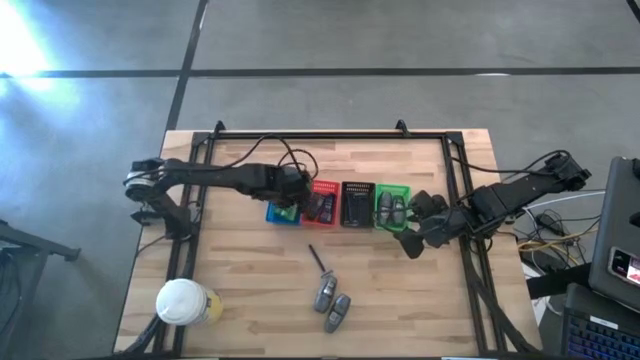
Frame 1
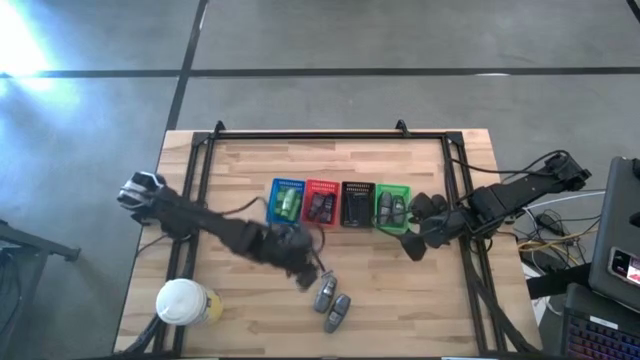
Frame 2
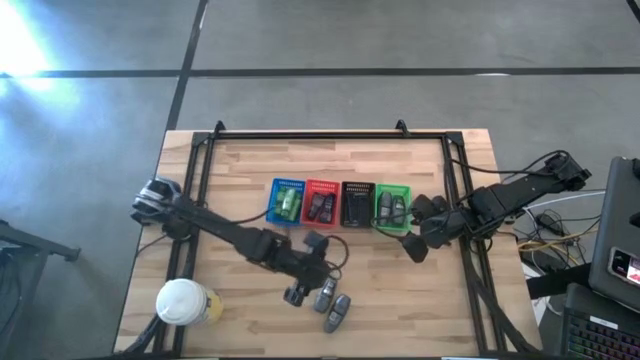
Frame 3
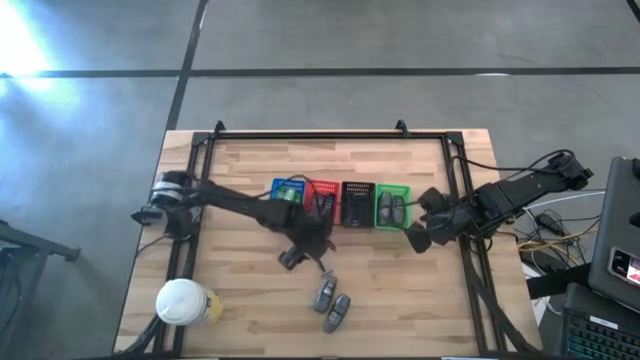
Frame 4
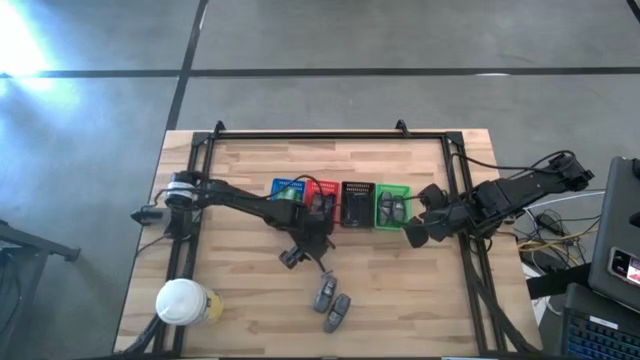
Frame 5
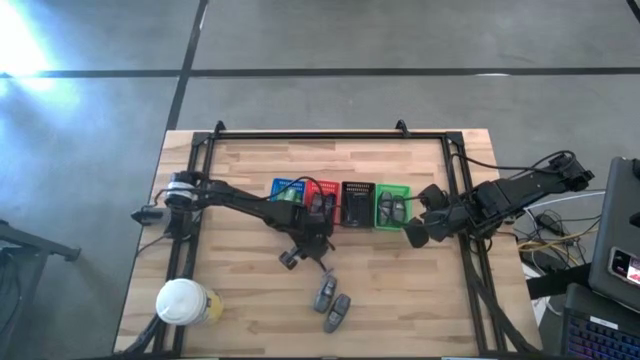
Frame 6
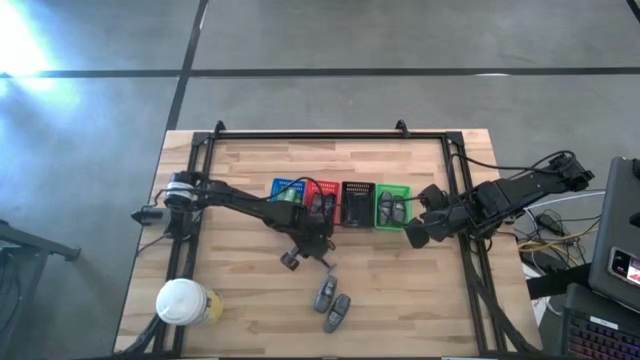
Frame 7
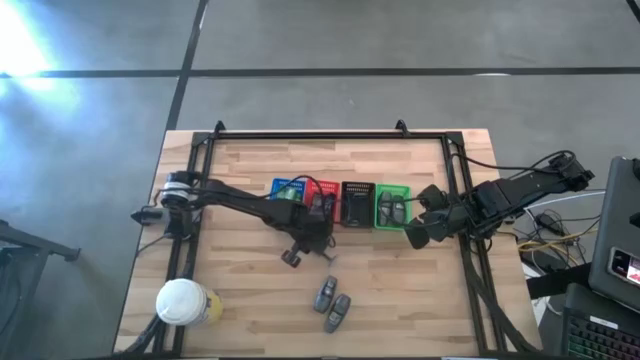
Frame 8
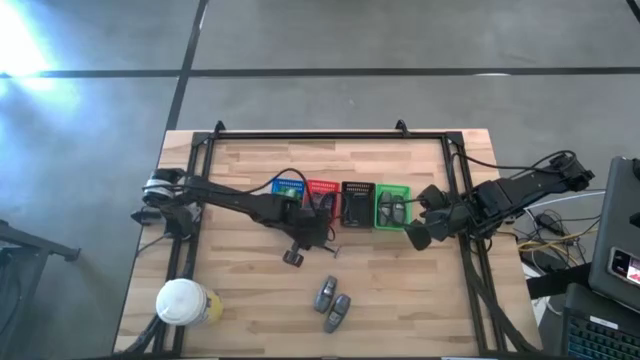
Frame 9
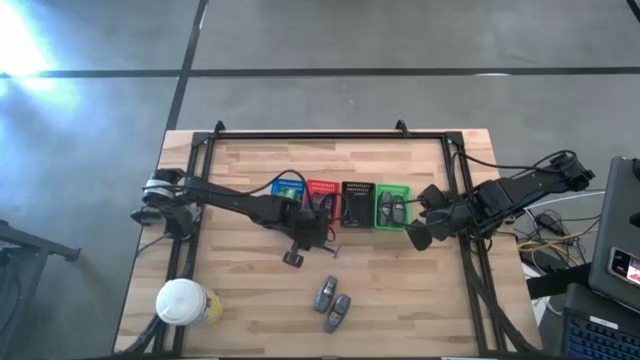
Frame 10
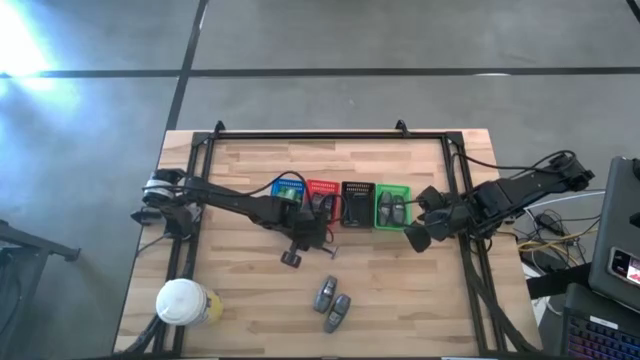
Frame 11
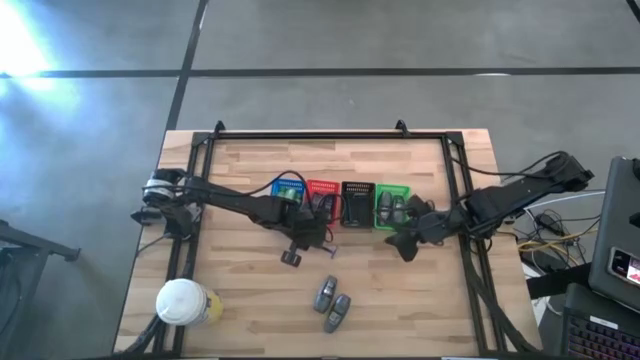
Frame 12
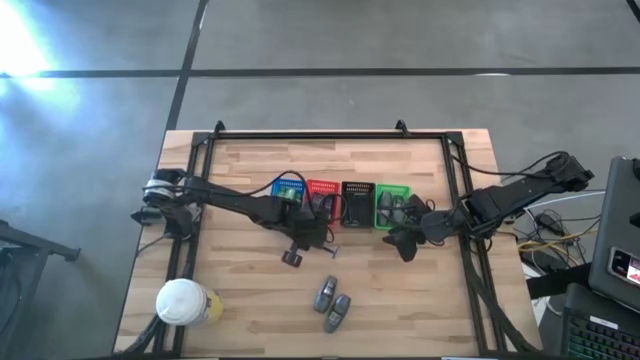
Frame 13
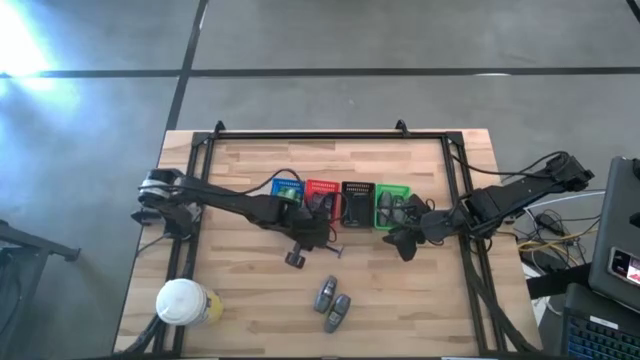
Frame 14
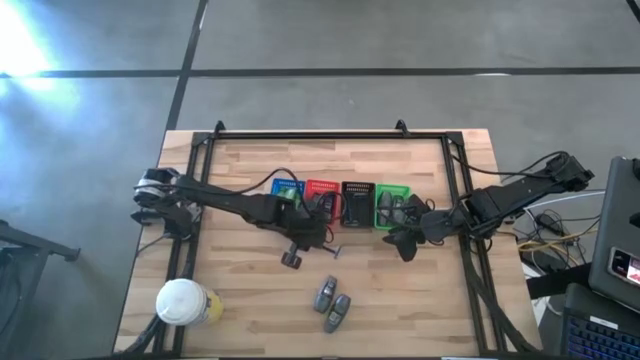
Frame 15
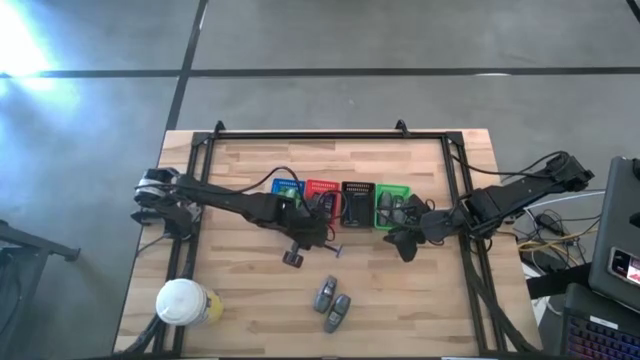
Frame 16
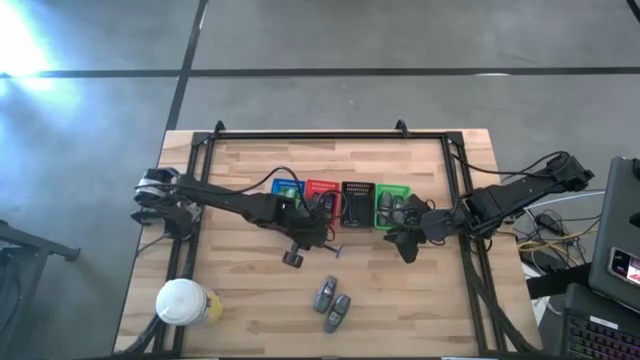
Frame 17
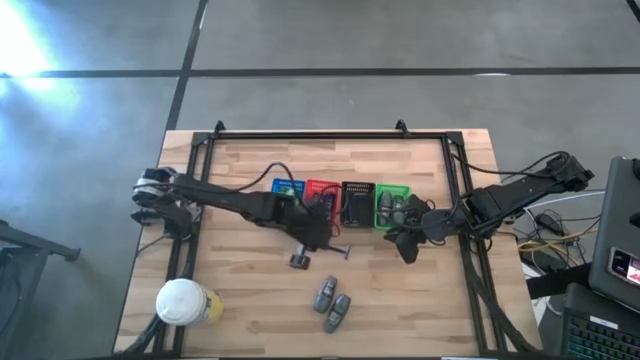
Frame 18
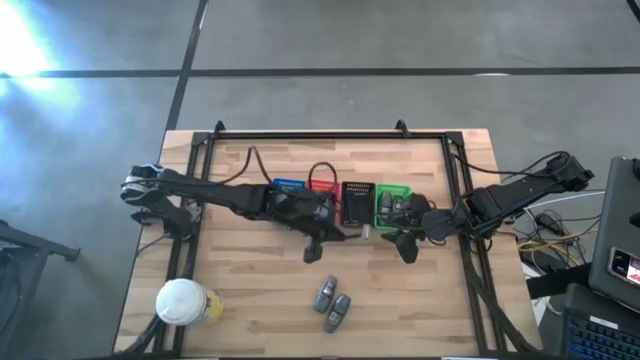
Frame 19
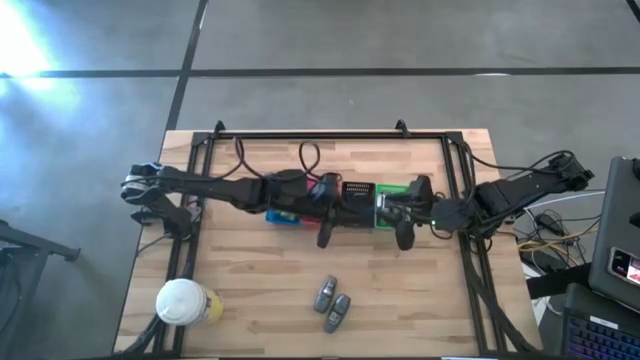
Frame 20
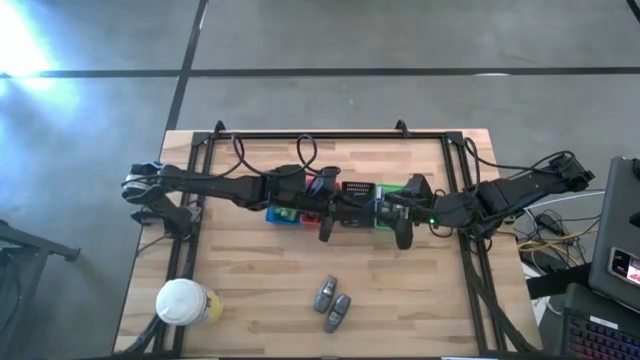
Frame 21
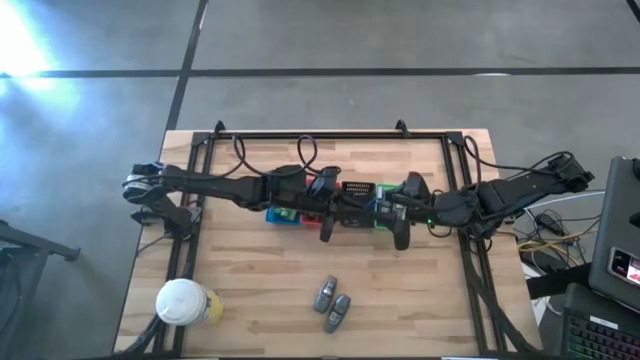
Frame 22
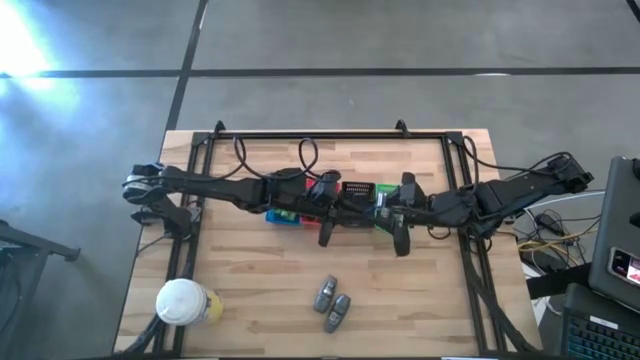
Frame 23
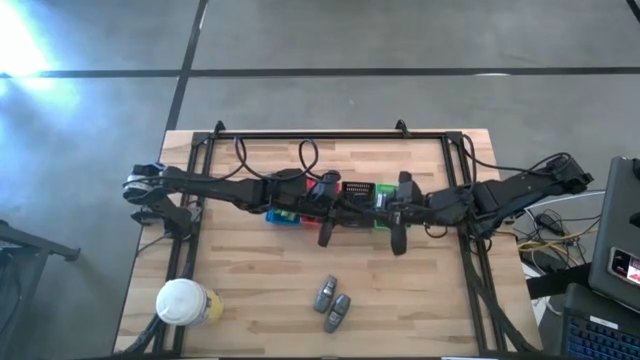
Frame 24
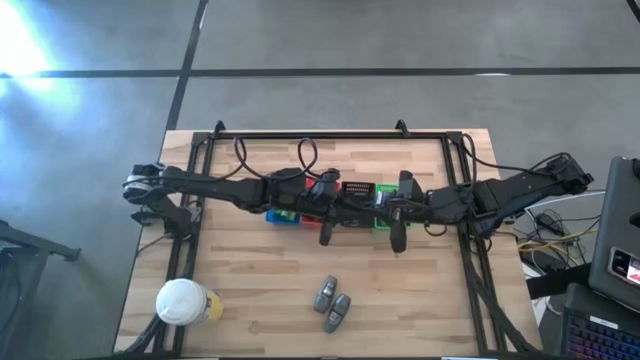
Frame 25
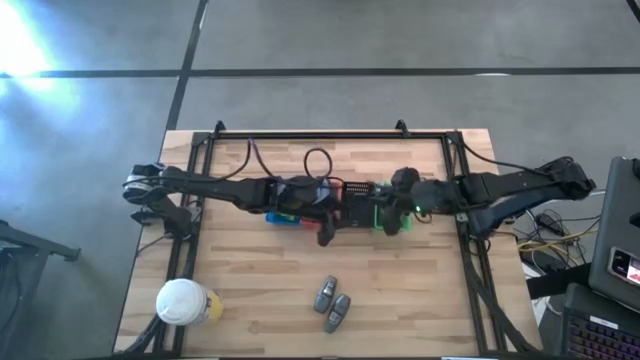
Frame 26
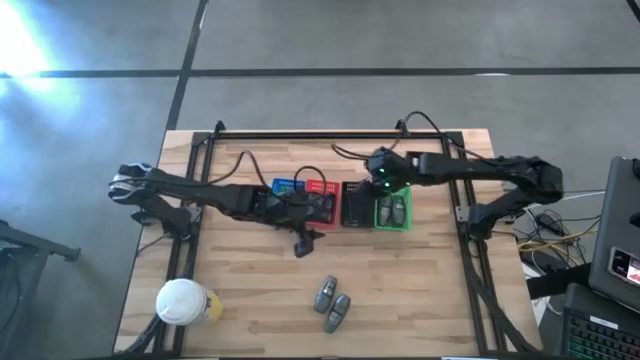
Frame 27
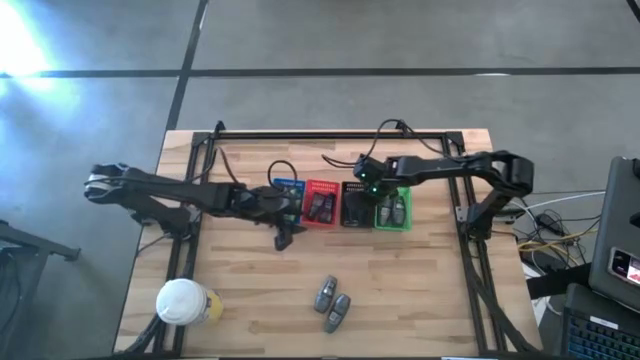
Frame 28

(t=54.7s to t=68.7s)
Task: Pick & Place Travel size toiletries
Put the blue razor into the black bin

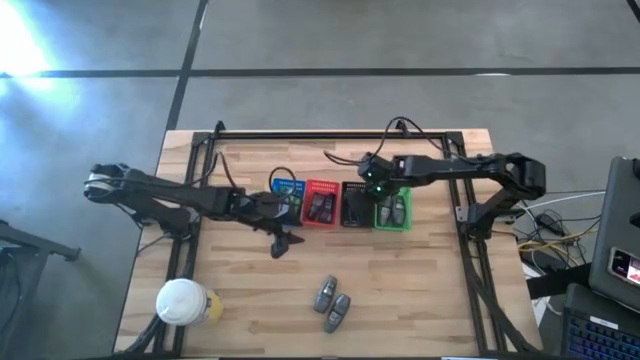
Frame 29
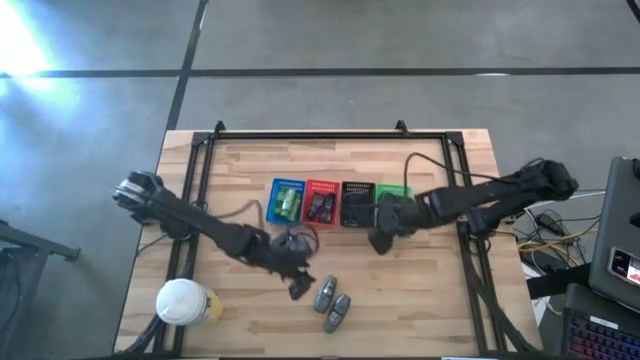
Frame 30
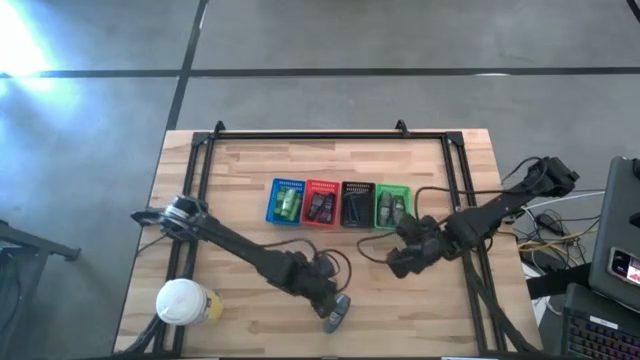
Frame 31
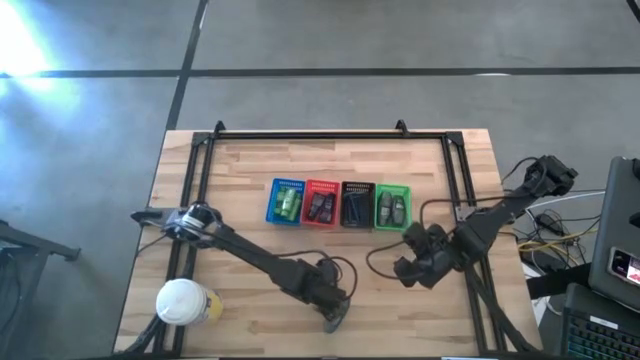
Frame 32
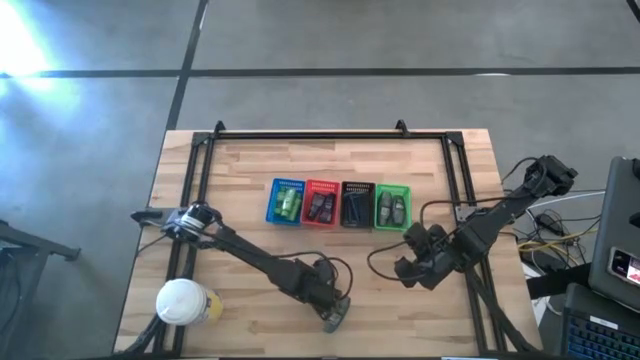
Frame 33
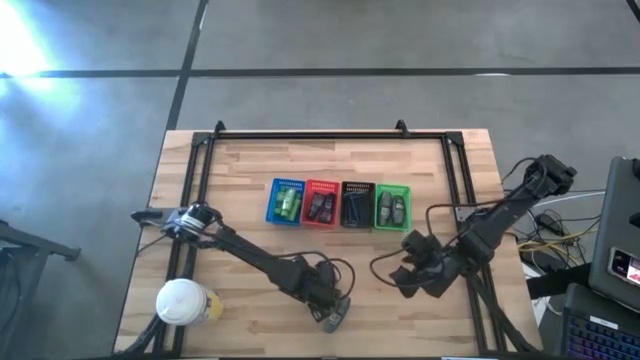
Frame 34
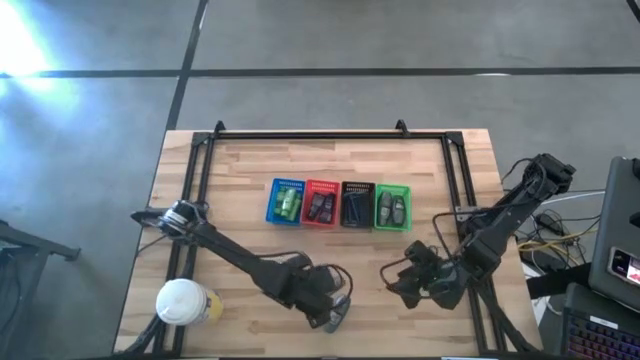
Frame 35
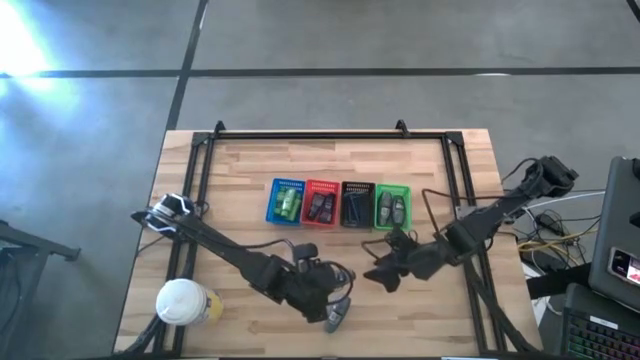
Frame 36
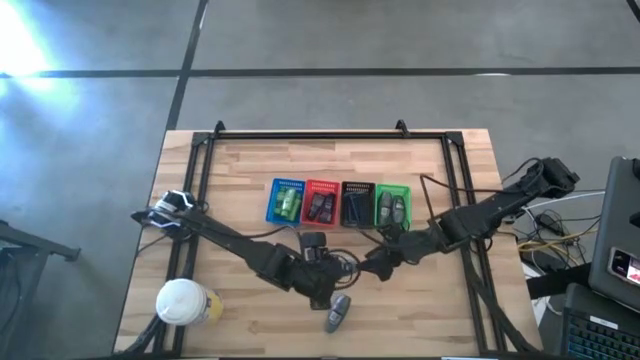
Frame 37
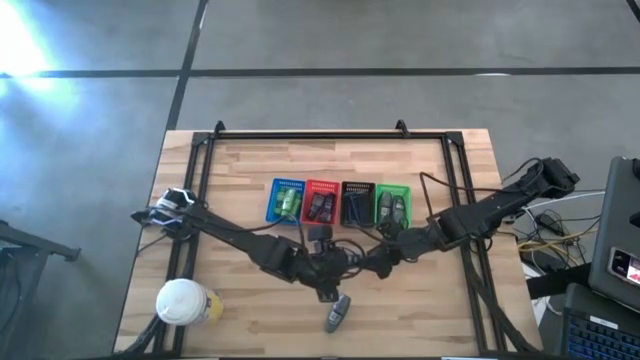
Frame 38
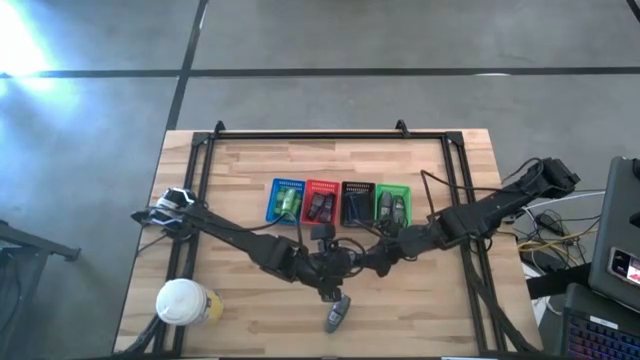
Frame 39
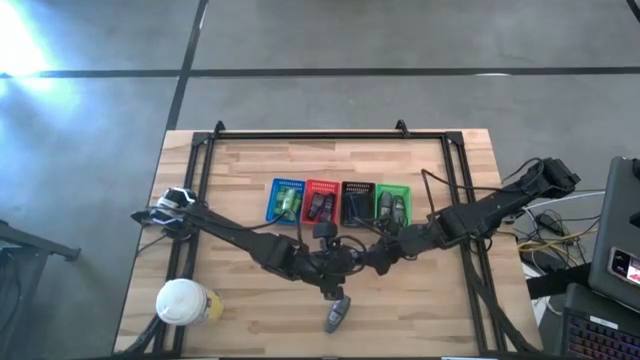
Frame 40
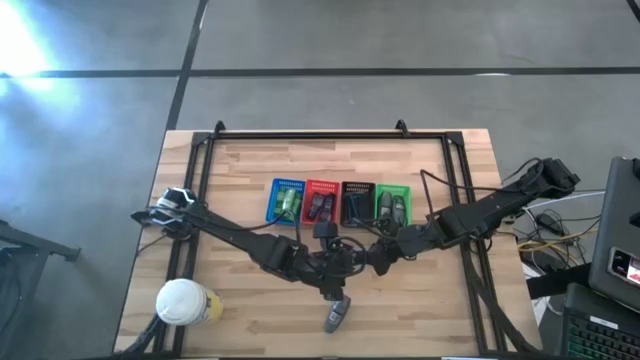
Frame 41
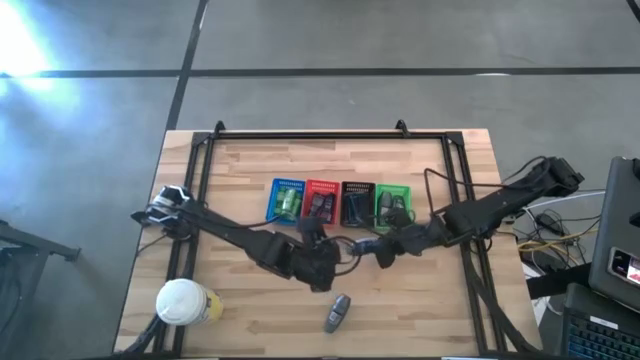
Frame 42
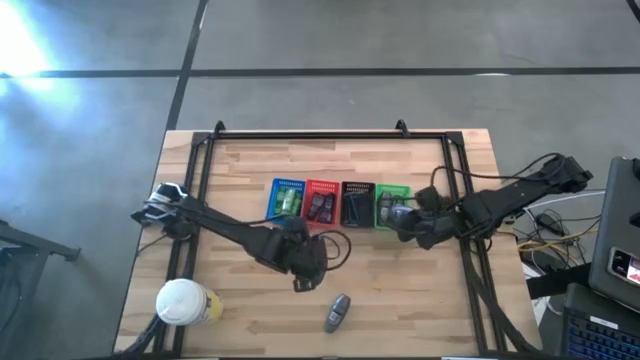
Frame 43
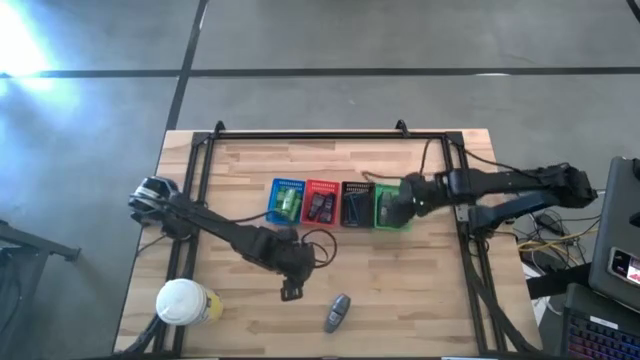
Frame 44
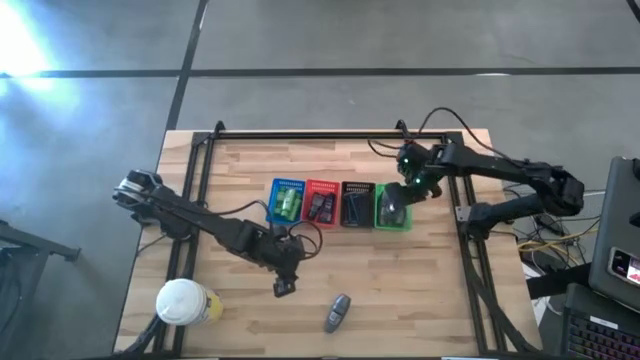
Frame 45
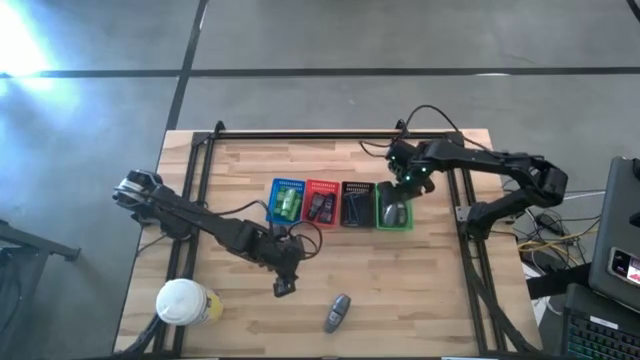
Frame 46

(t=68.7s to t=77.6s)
Put the gray deodorant into the green bin
